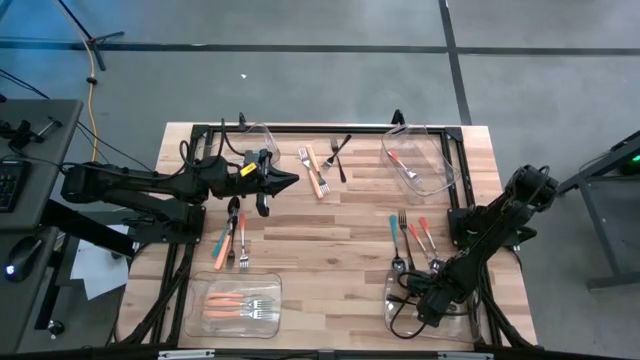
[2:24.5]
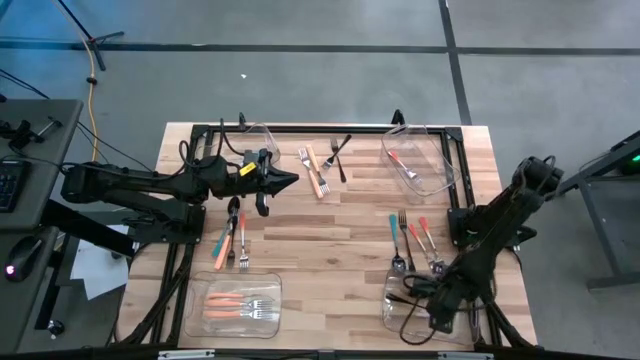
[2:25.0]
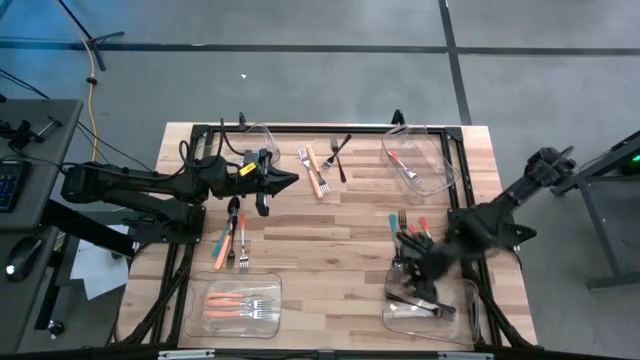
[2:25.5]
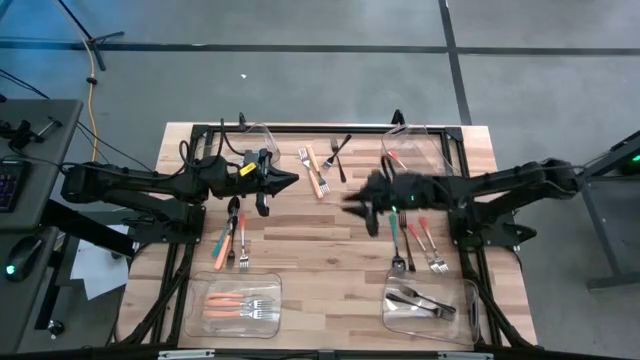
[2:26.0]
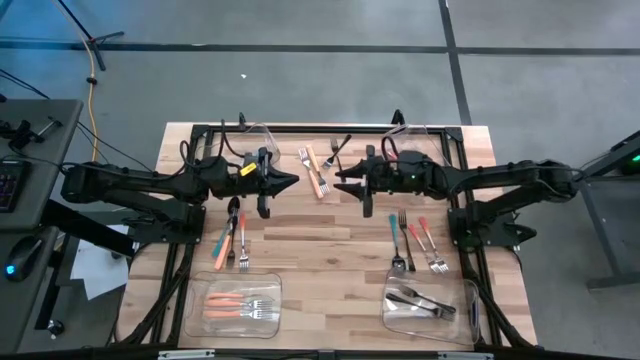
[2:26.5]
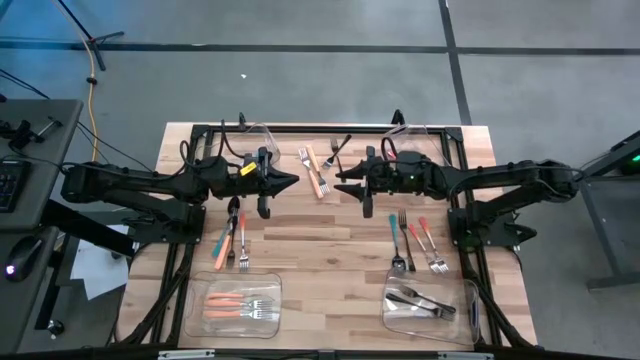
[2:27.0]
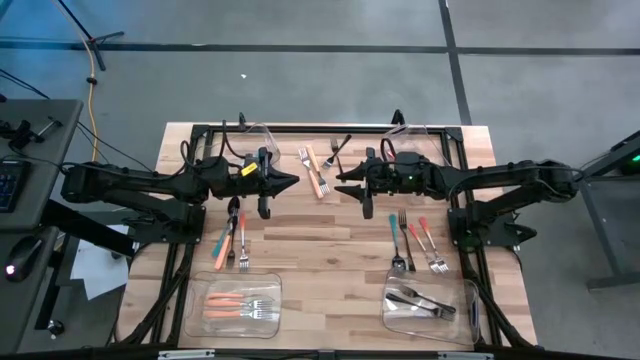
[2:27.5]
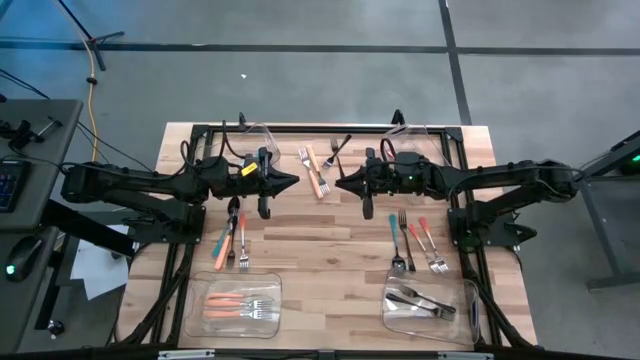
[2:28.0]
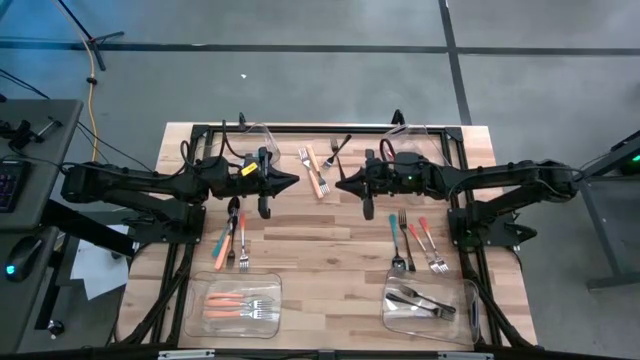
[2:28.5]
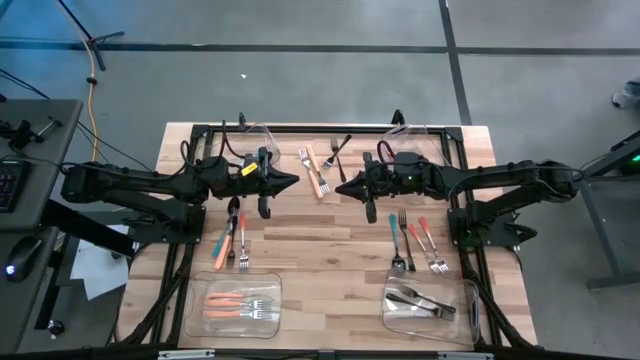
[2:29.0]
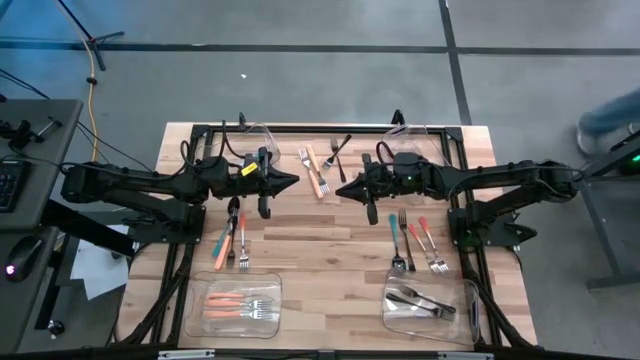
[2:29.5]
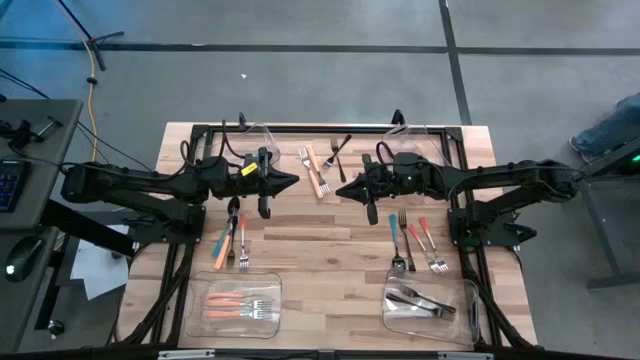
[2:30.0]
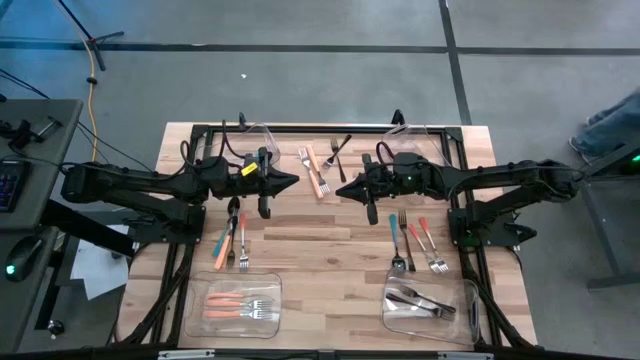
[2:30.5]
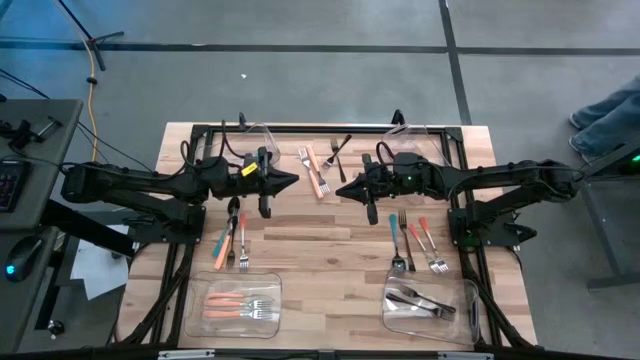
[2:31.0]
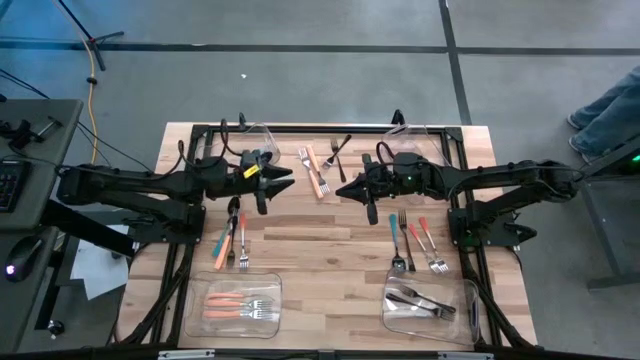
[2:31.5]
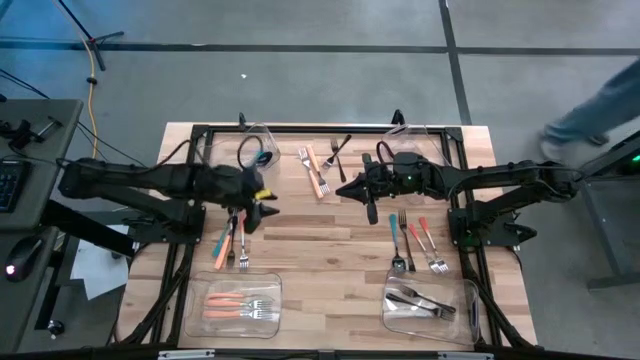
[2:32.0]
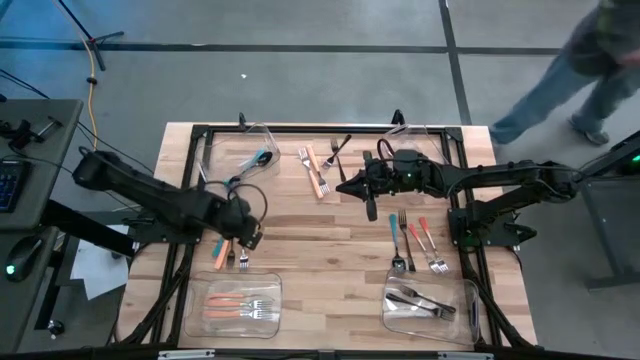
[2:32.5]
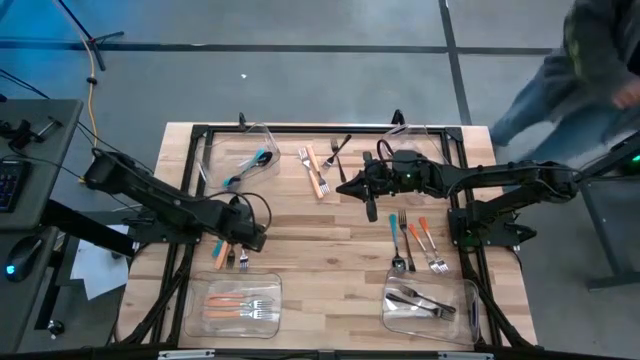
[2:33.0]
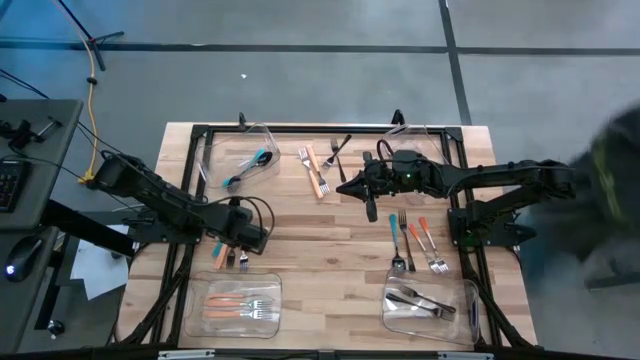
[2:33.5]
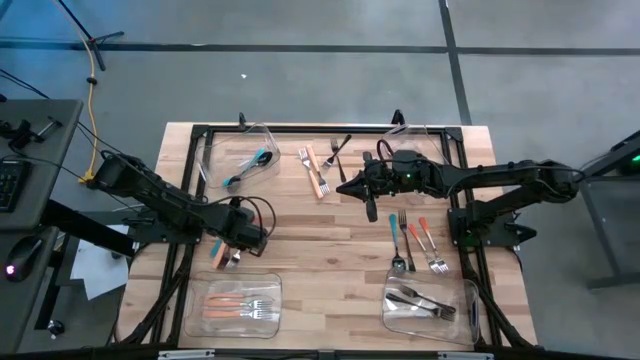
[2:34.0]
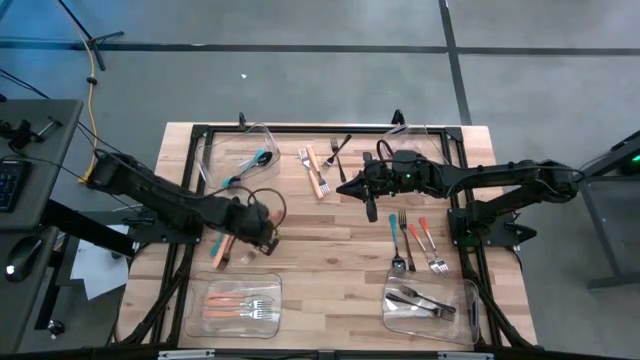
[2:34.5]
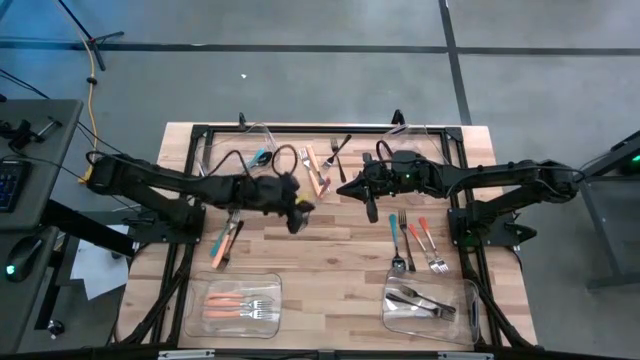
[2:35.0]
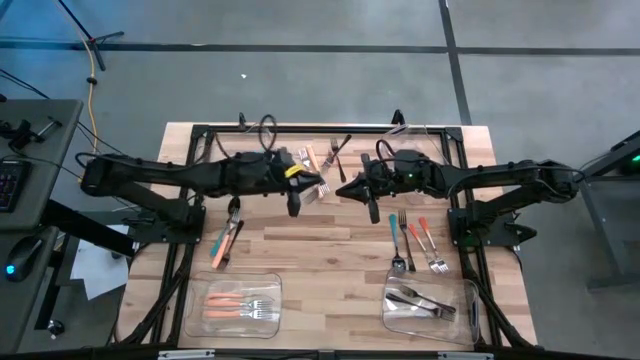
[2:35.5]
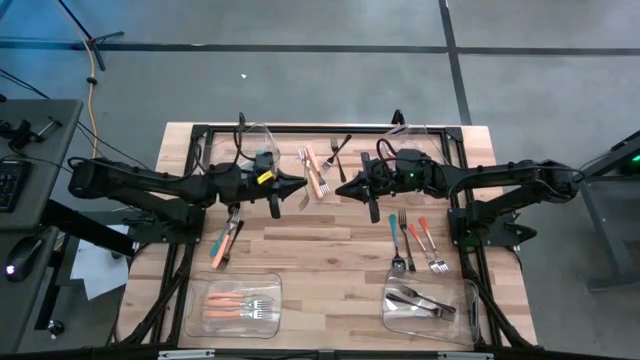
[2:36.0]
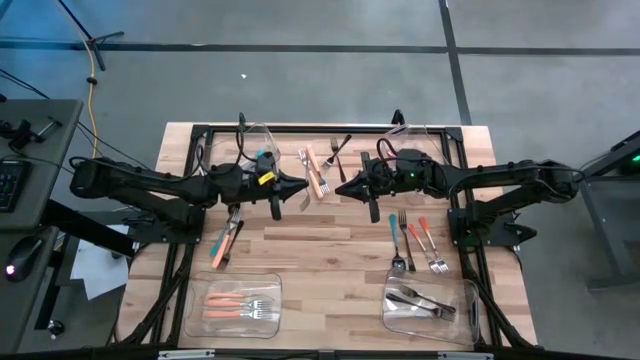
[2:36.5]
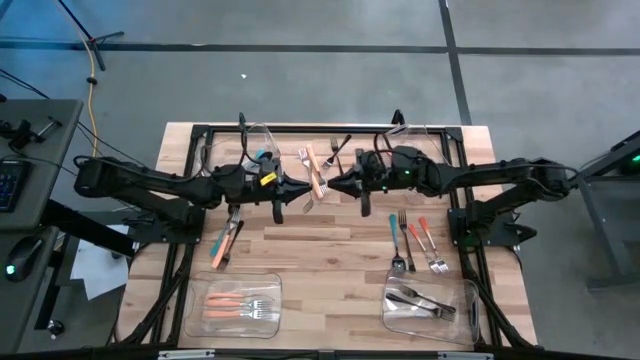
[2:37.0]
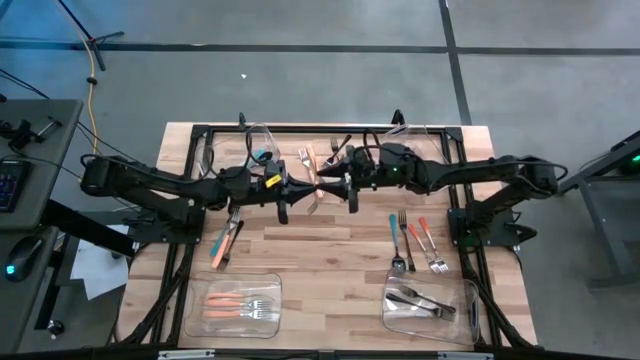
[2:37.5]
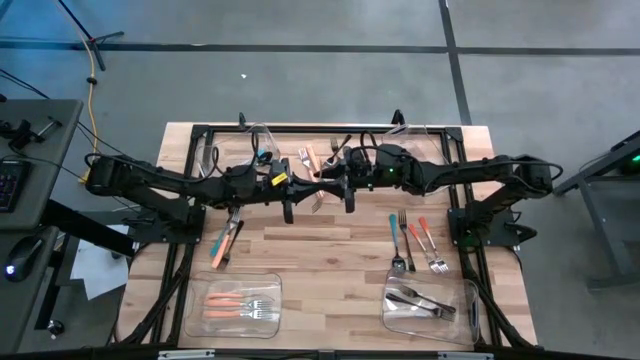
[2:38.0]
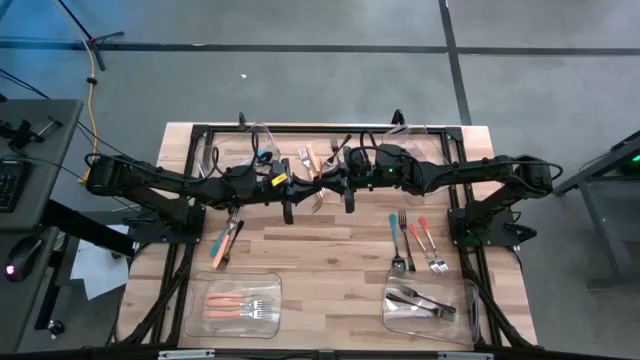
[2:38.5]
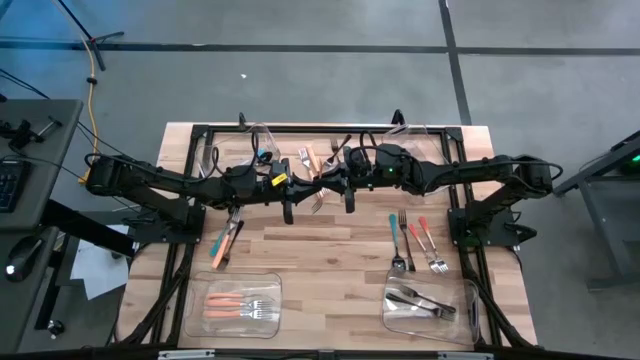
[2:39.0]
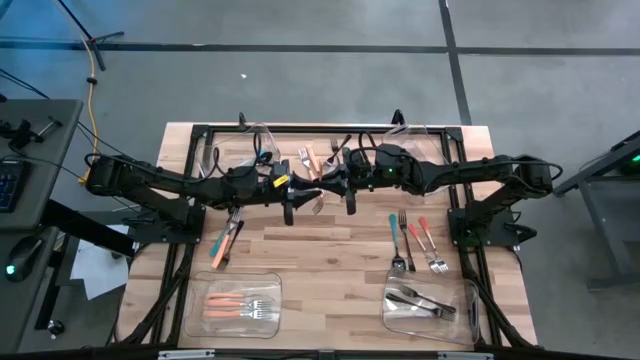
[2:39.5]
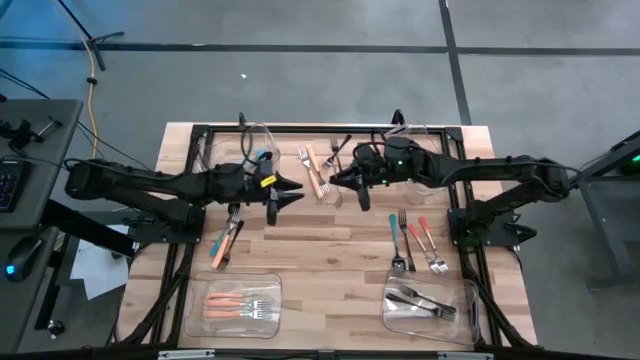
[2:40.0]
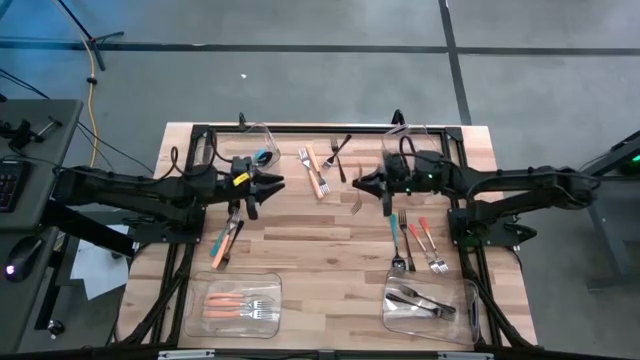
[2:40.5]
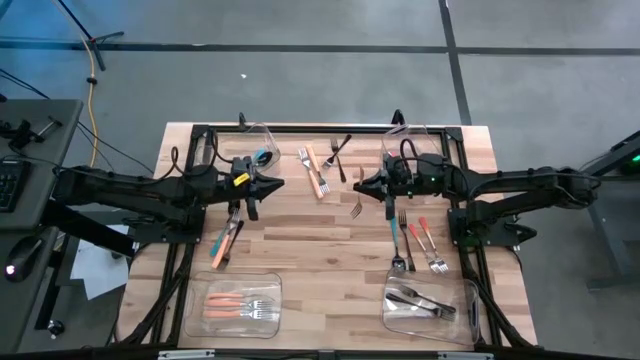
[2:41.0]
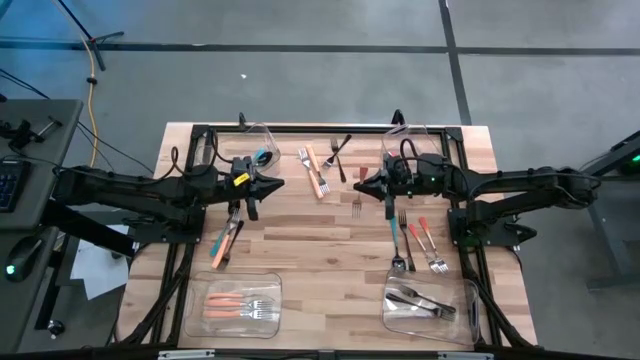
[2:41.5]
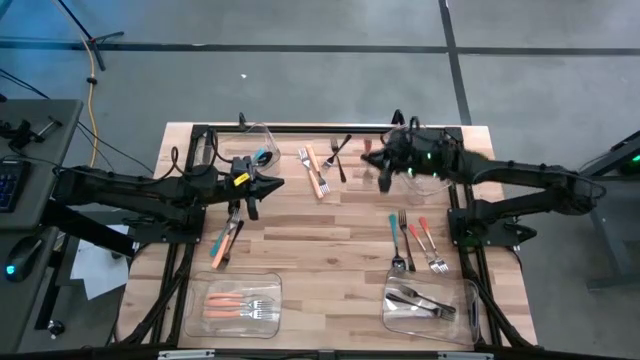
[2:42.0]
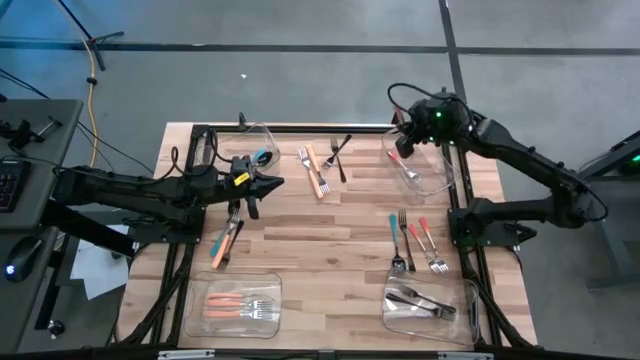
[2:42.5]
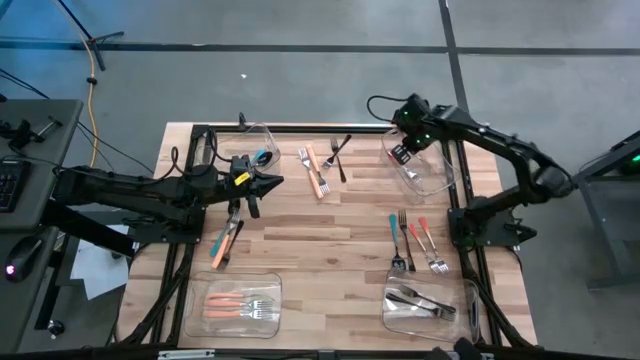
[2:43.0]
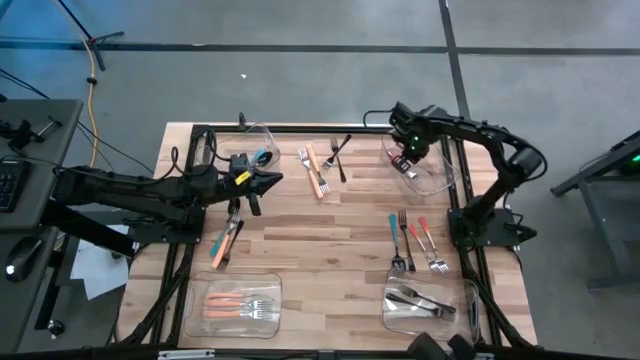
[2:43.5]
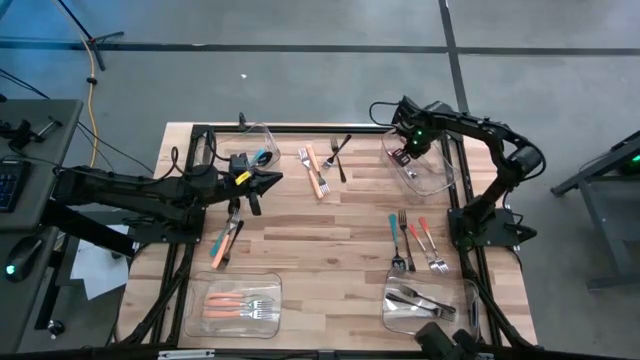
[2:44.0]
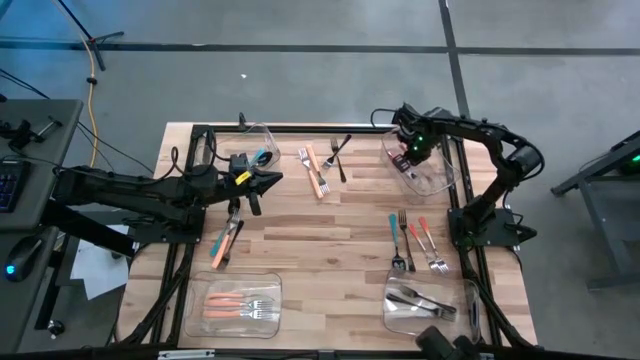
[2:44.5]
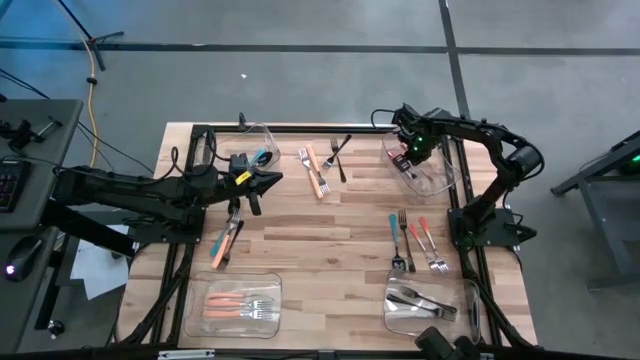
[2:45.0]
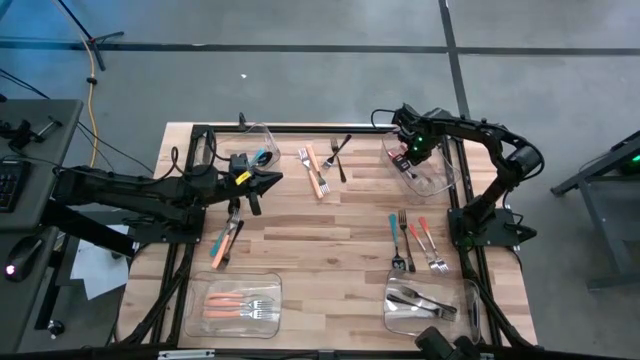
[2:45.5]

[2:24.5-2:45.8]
Task: Sort silverware by color (type)
Put the orange fork into the top right transparent bin

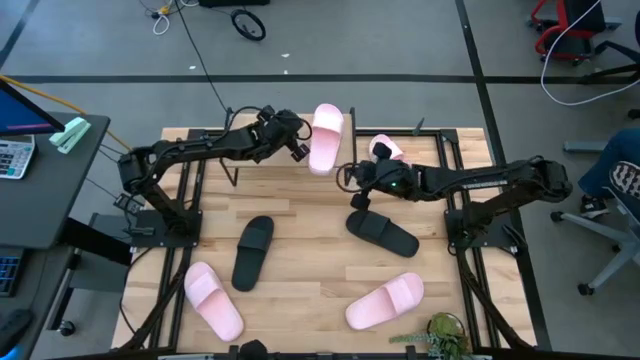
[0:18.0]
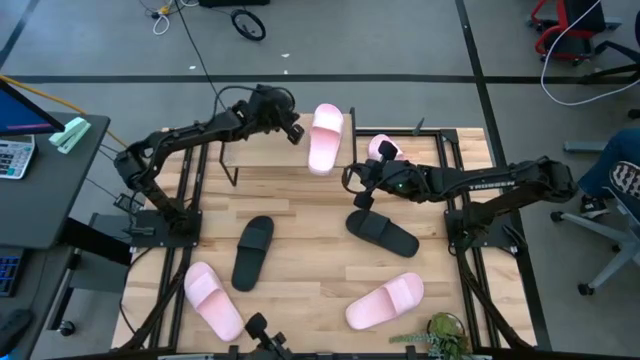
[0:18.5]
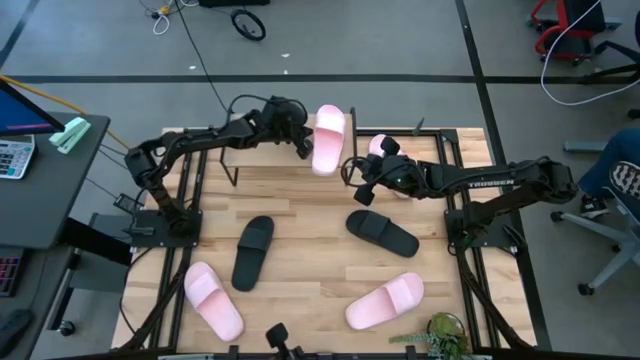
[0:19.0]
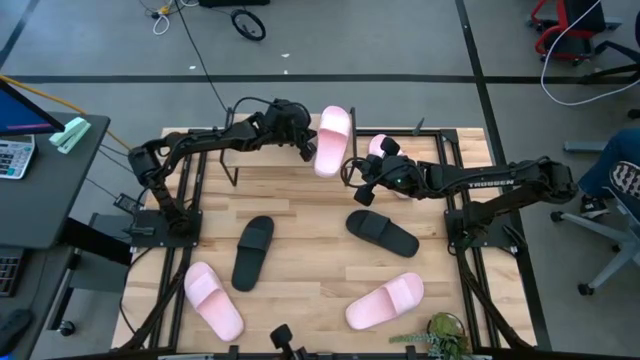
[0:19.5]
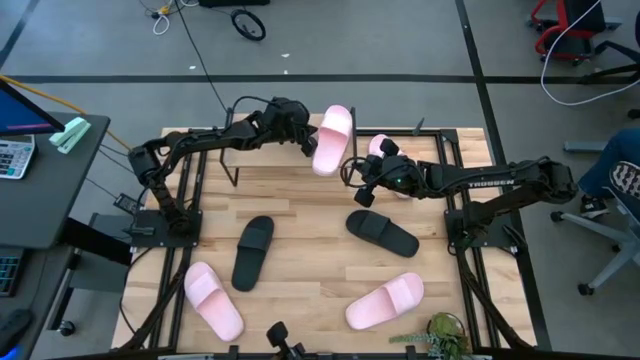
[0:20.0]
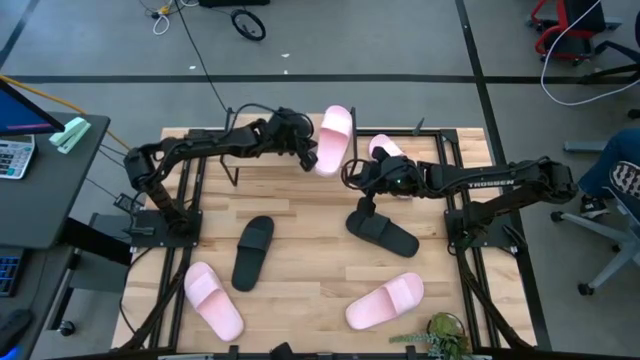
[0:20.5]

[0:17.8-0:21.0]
Task: Pick and place slides into the shelf
Adjust the pink slipper on the shelf
